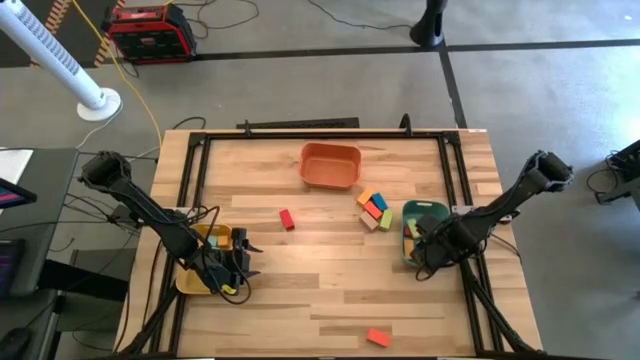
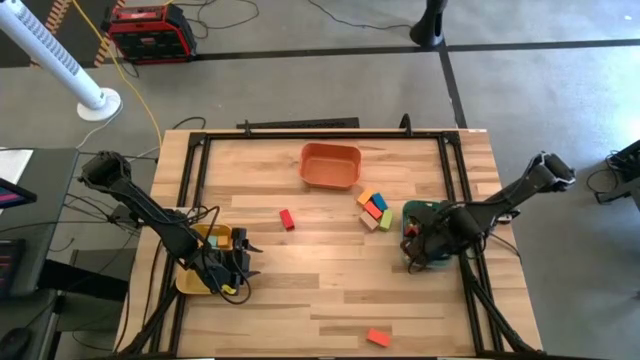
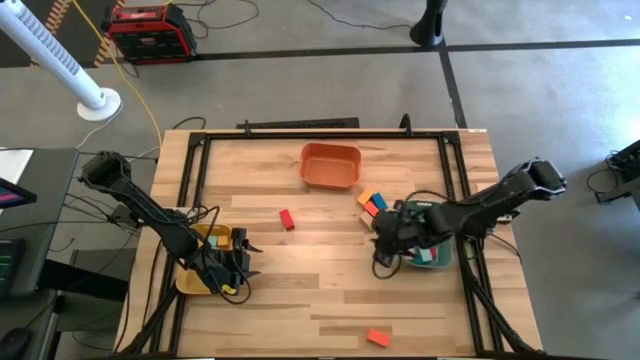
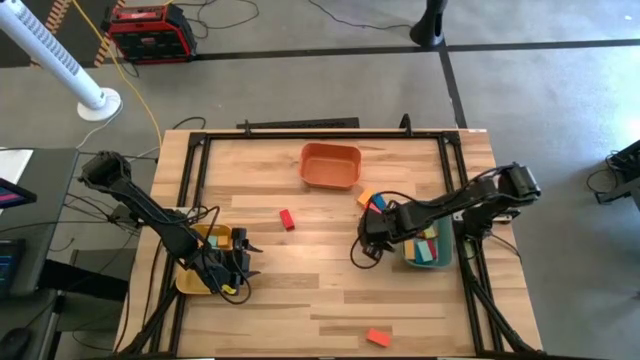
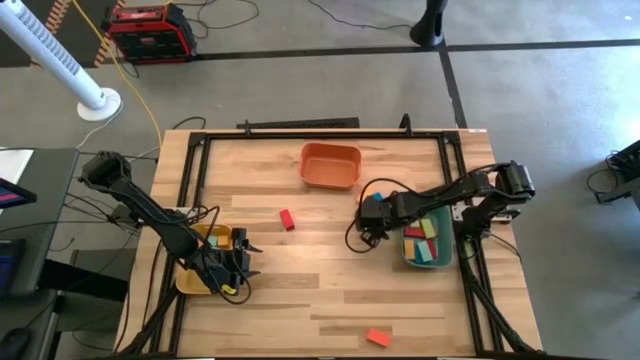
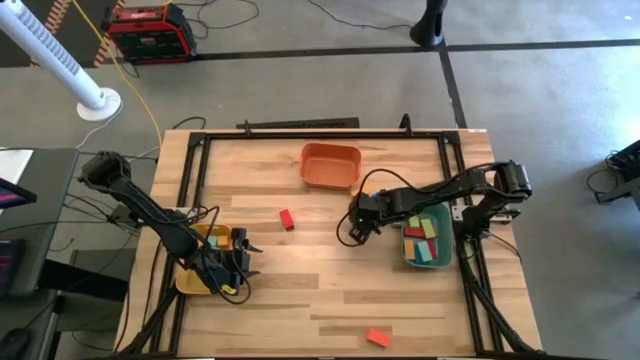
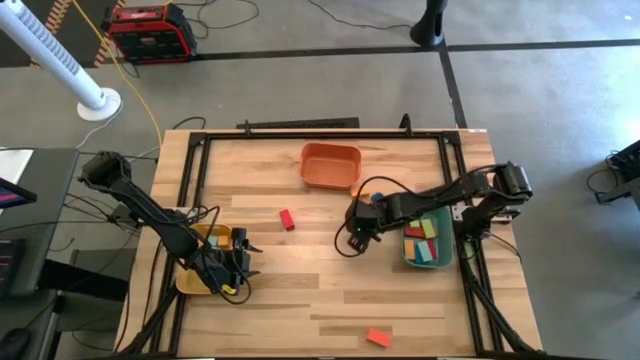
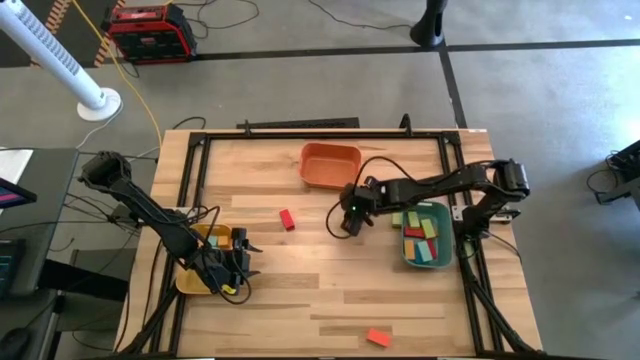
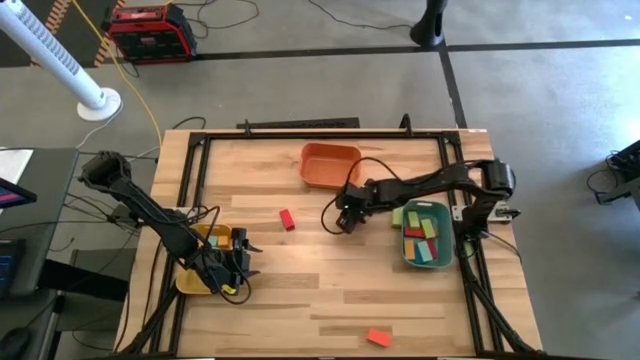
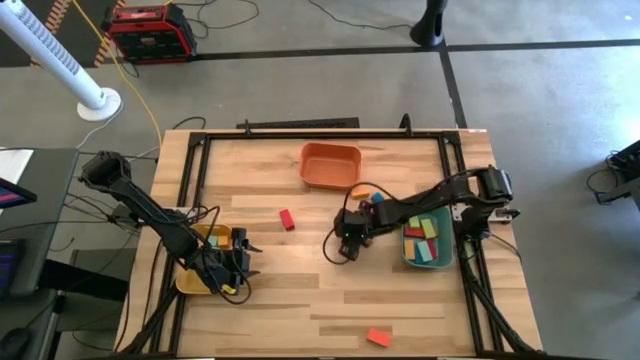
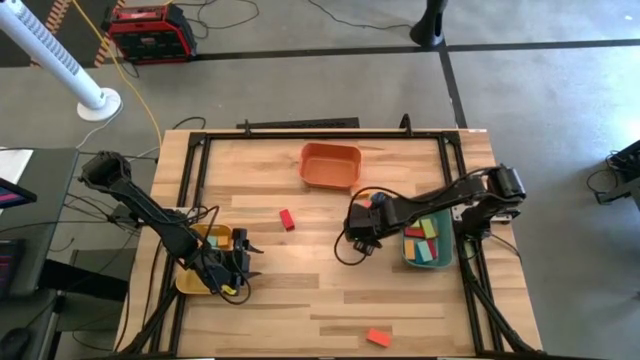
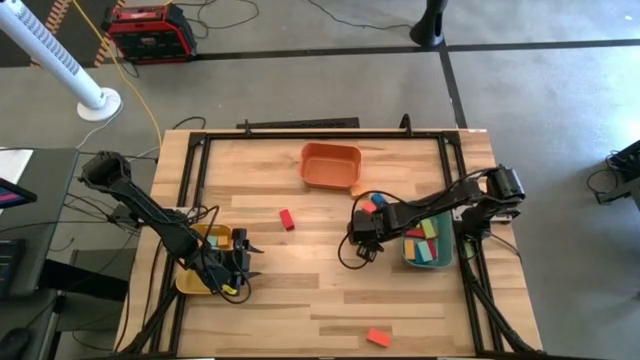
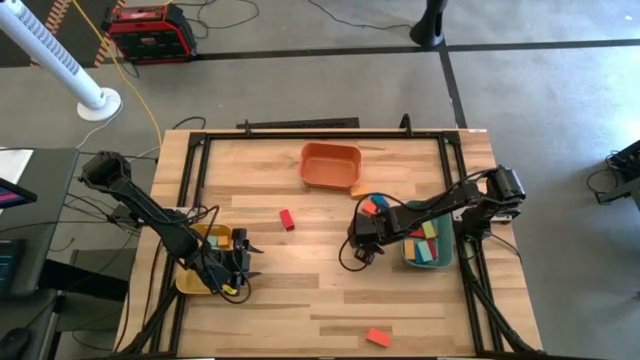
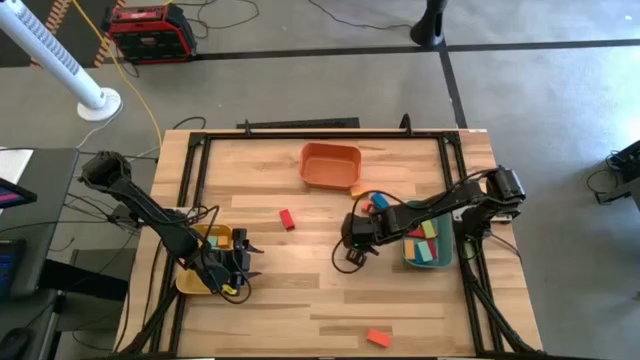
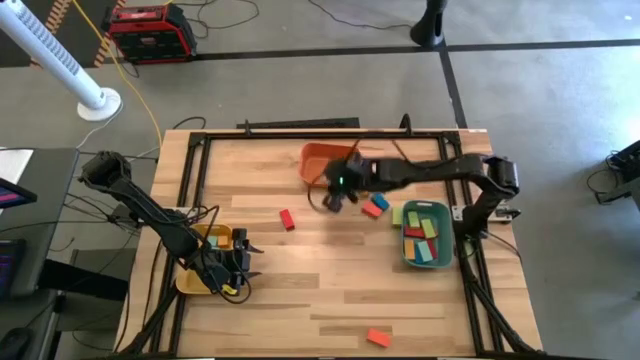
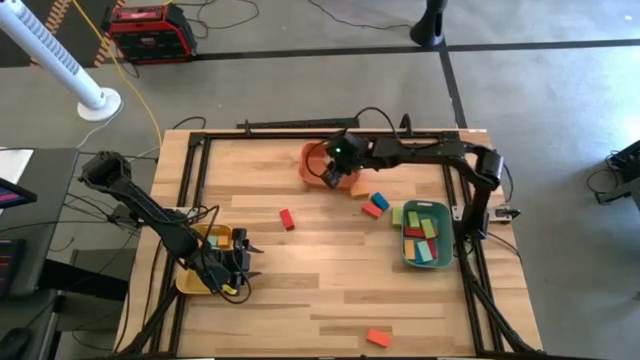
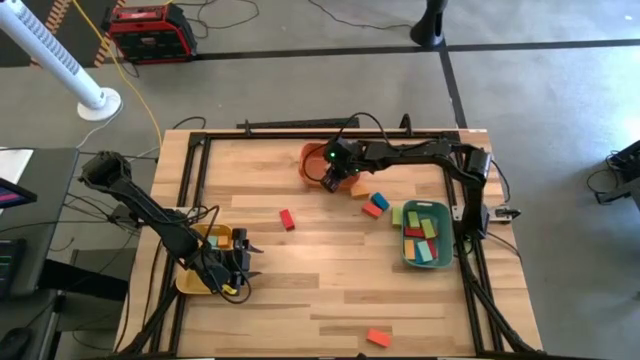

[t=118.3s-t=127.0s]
Task: Sort blocks by size
Put the large white block into the orange bin

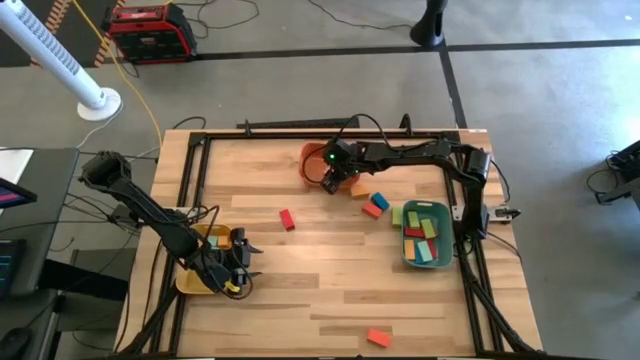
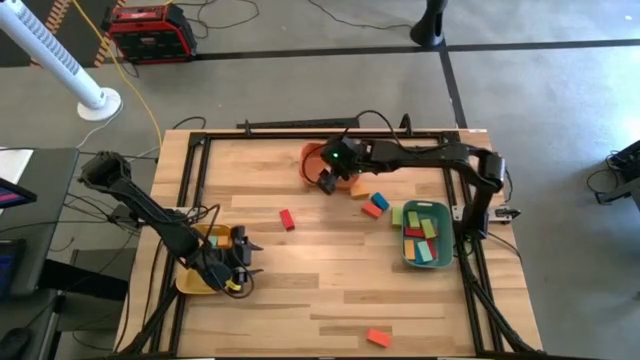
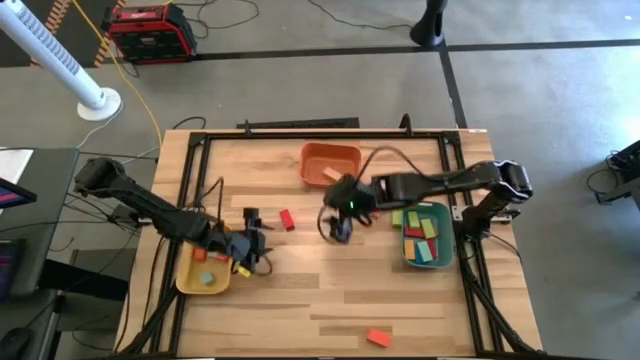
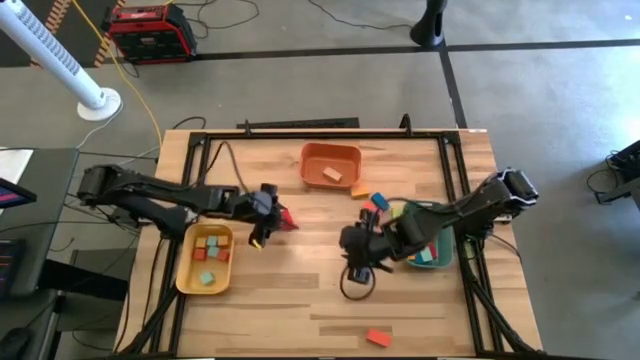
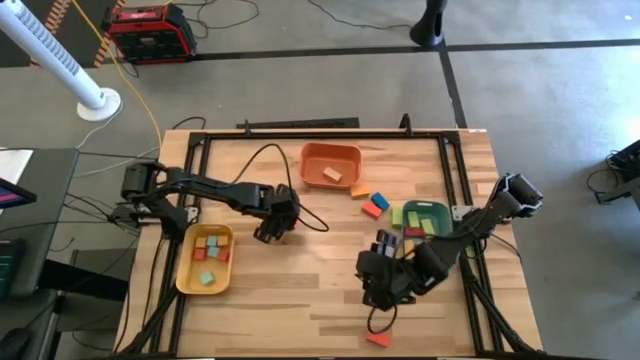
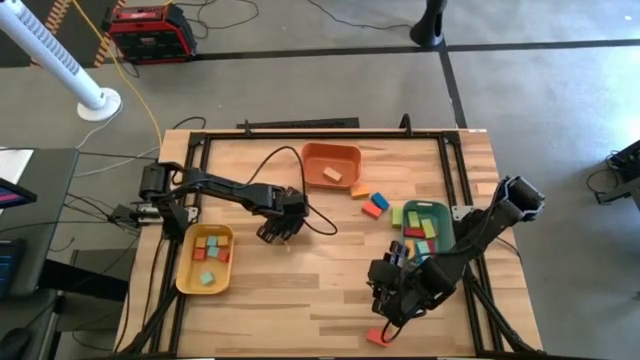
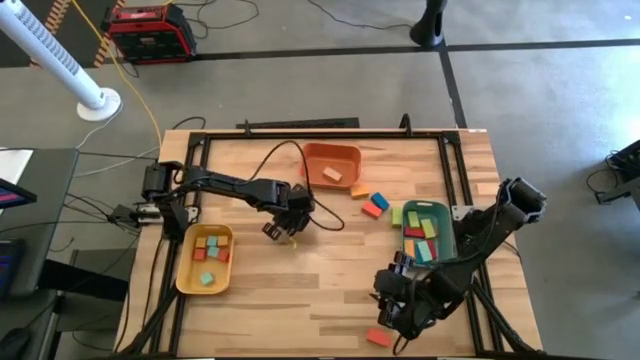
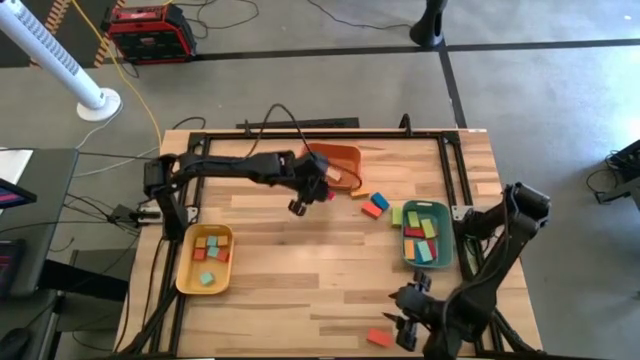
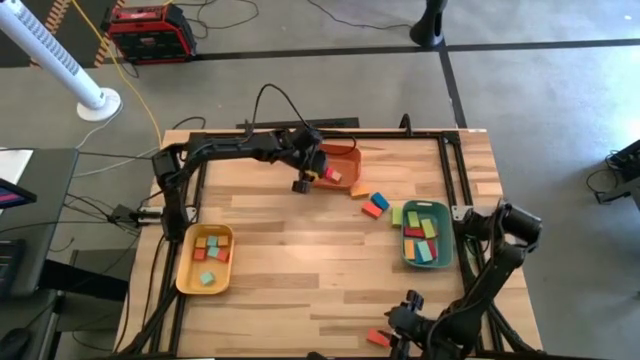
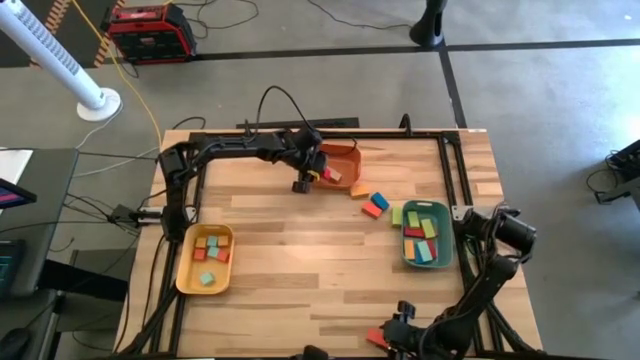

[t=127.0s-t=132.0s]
Put the large red block into the orange bin

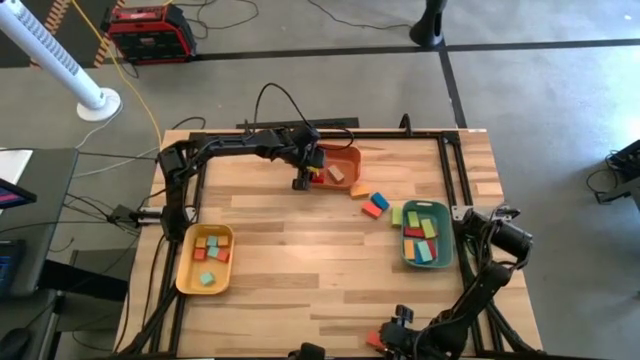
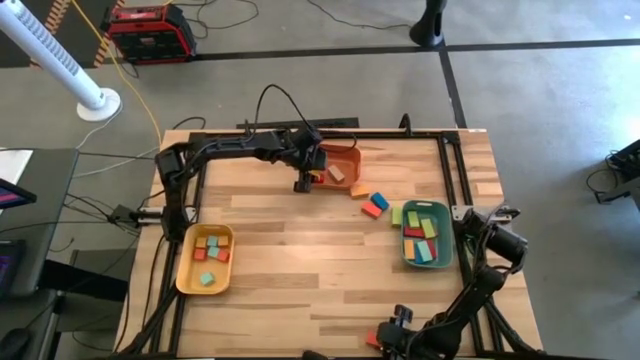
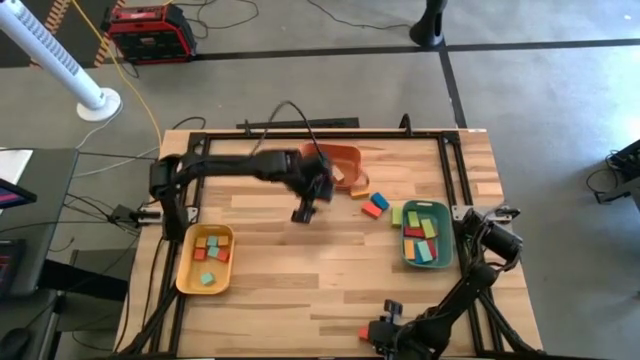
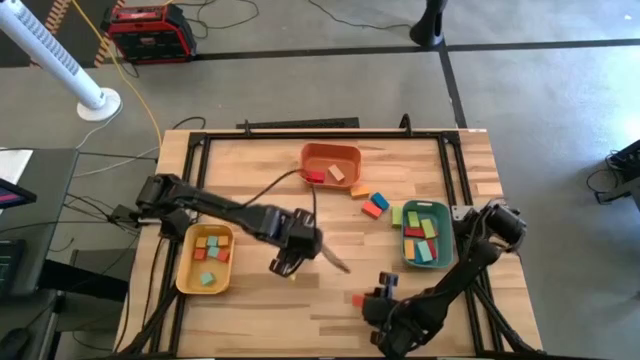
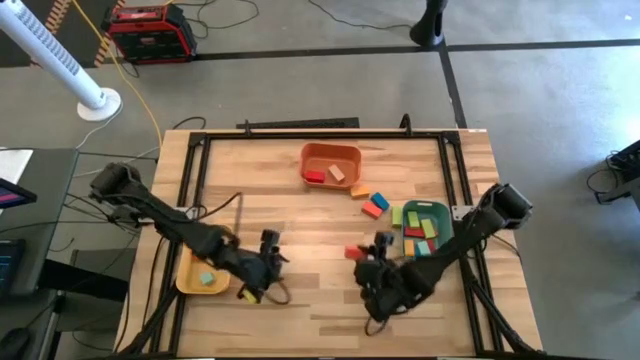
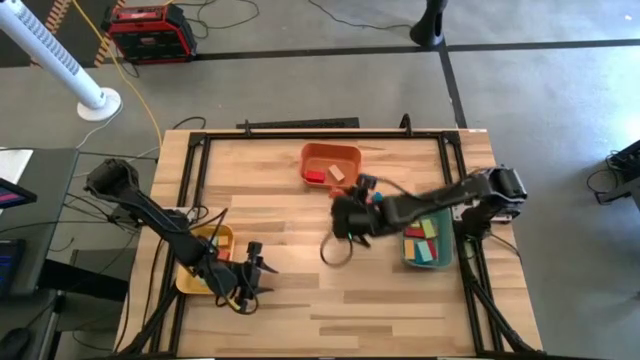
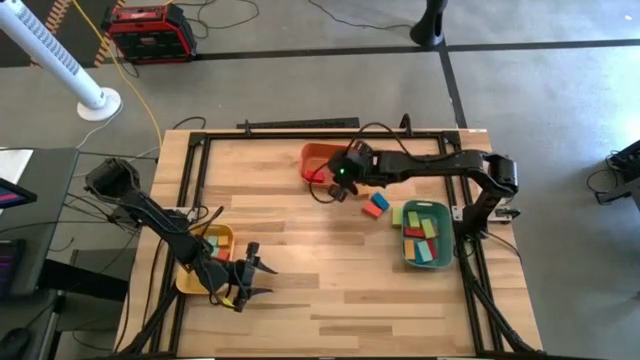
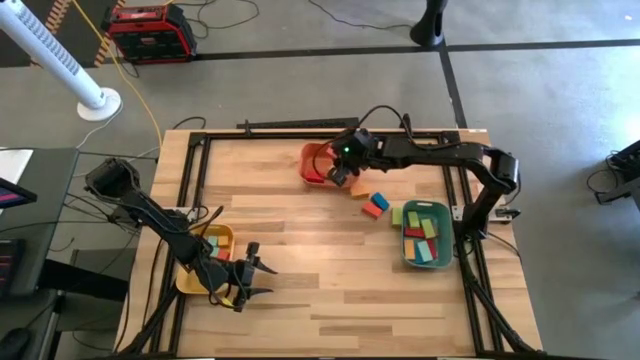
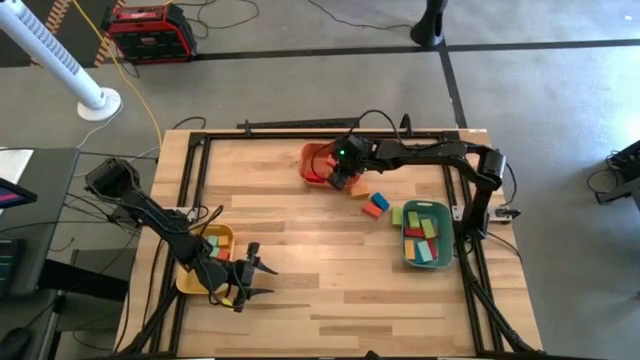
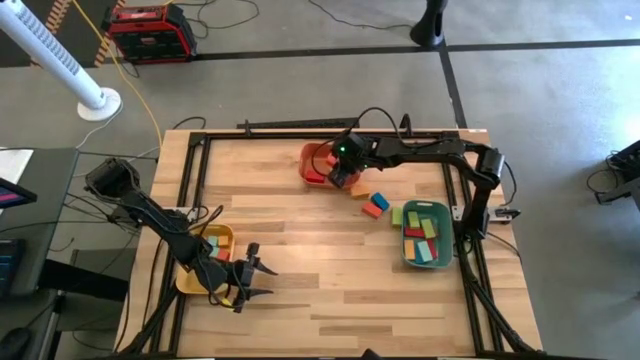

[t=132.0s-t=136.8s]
Put the large orange block into the orange bin

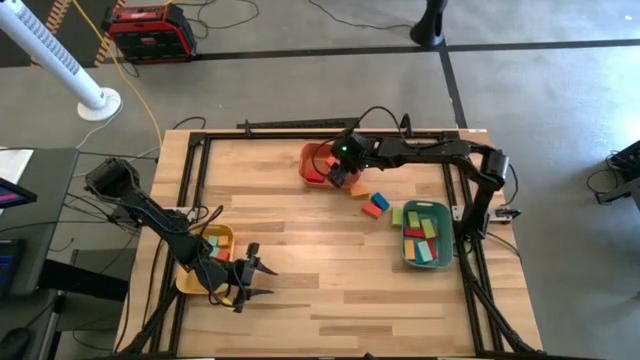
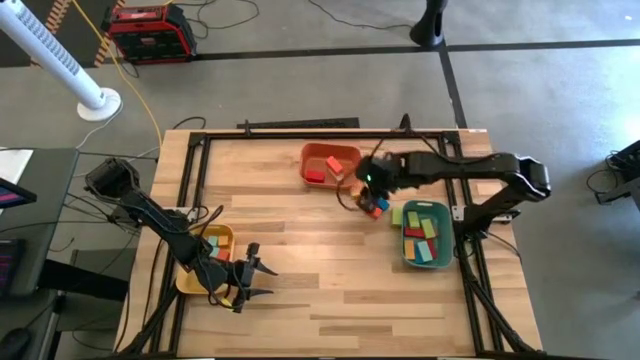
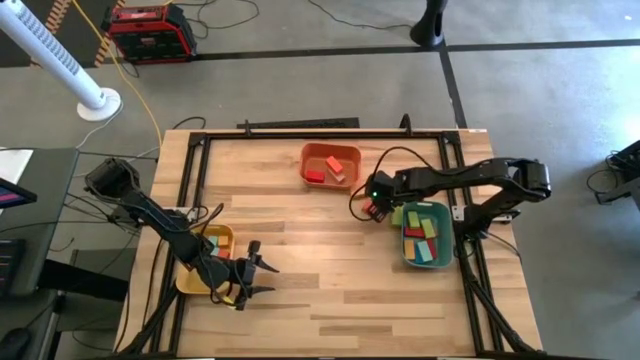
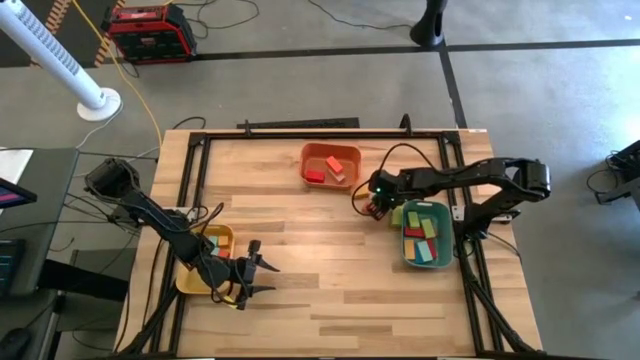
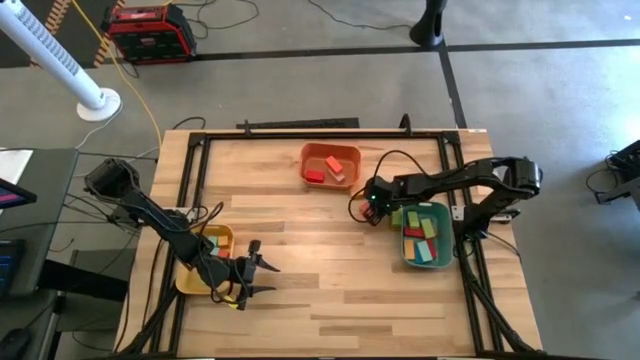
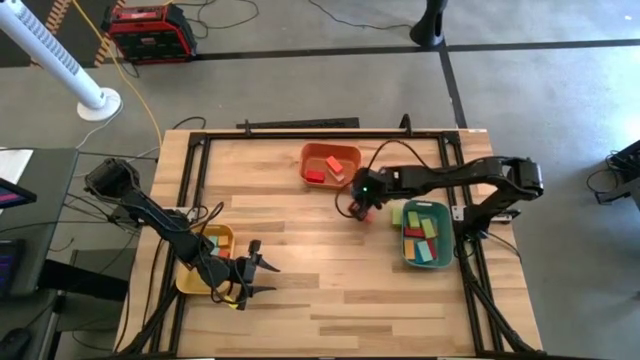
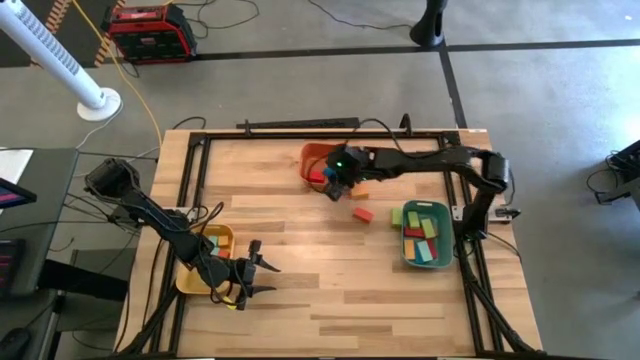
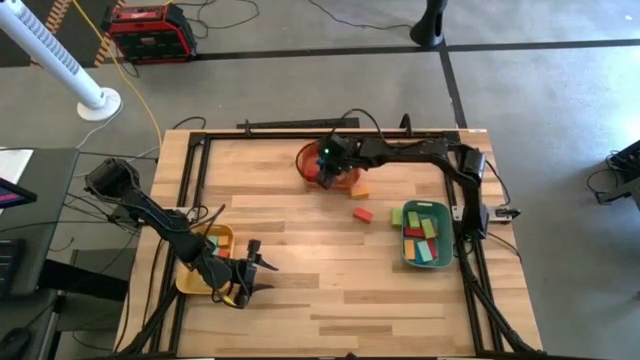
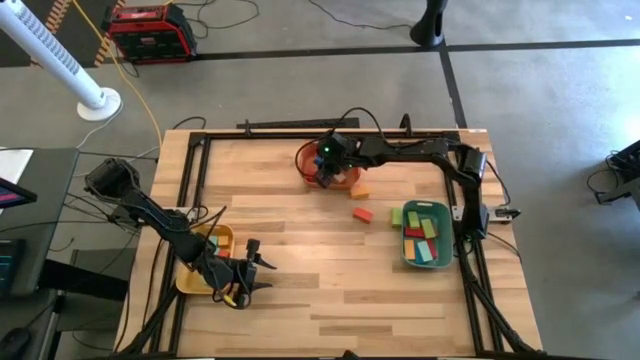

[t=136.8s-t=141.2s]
Put the large blue block into the orange bin
